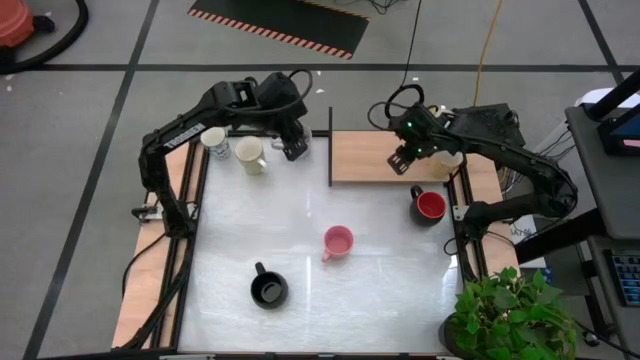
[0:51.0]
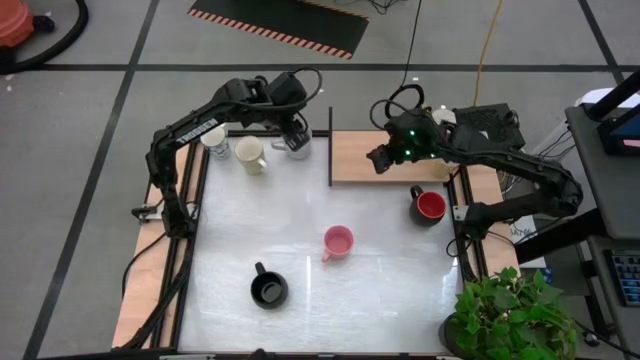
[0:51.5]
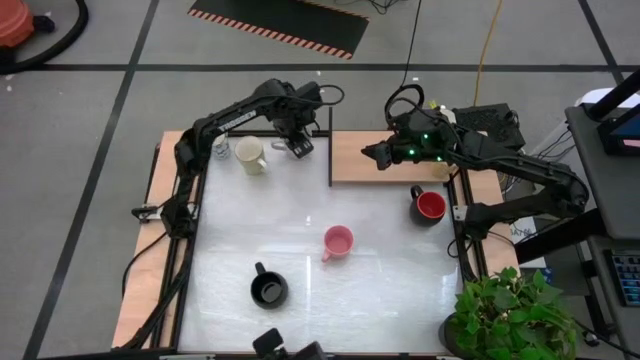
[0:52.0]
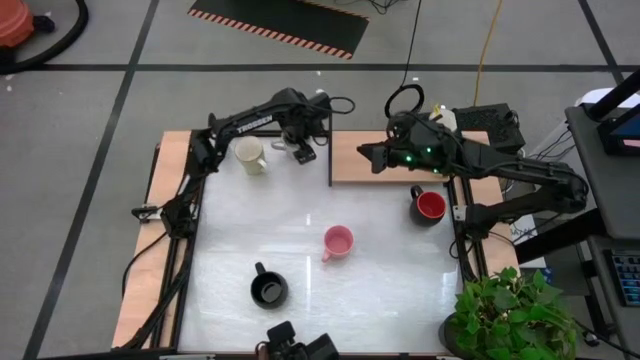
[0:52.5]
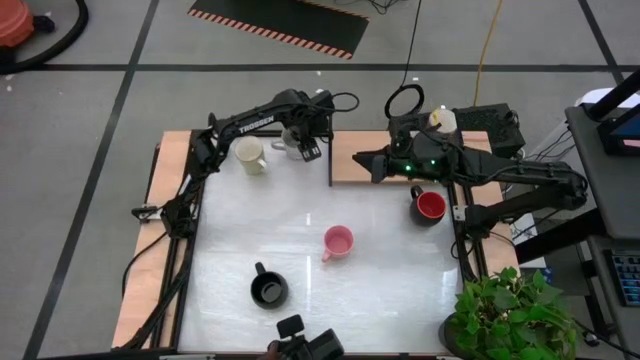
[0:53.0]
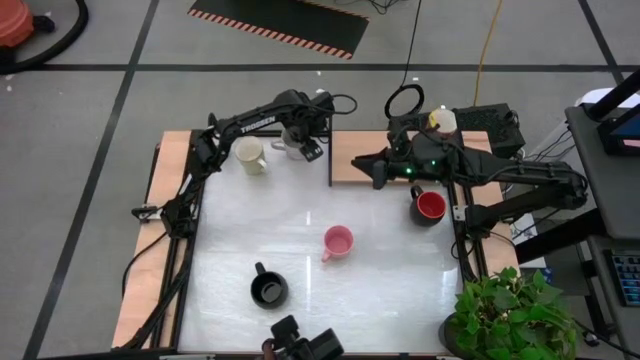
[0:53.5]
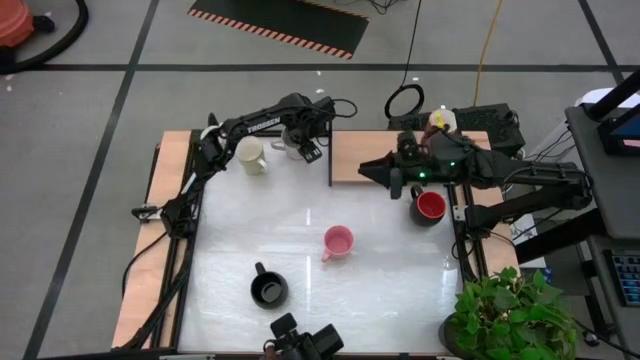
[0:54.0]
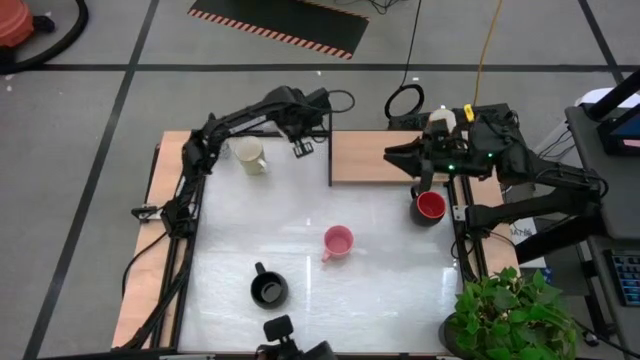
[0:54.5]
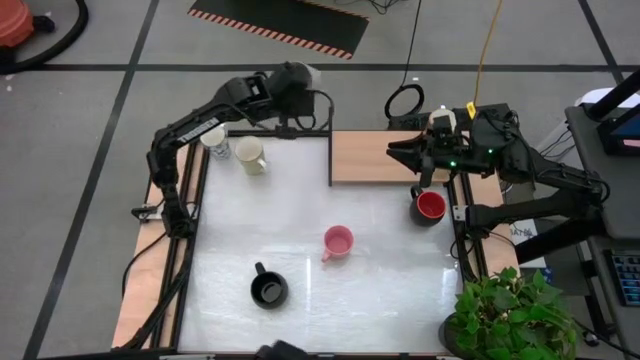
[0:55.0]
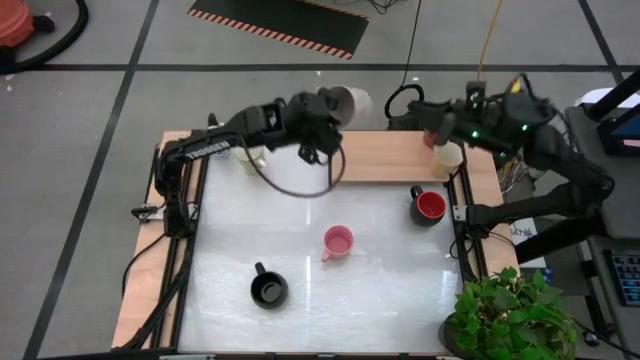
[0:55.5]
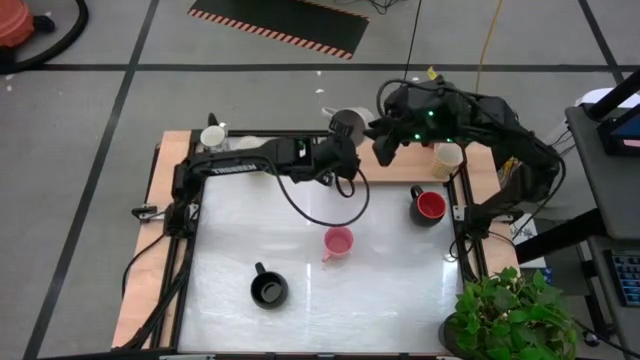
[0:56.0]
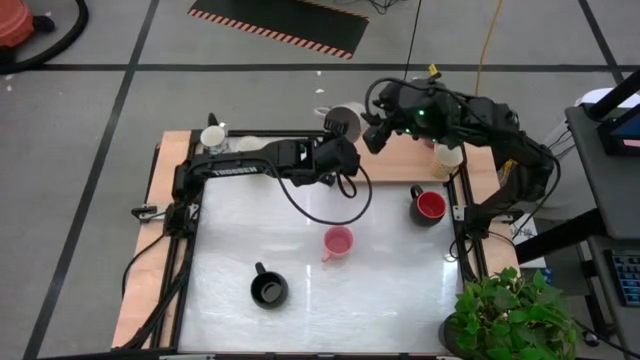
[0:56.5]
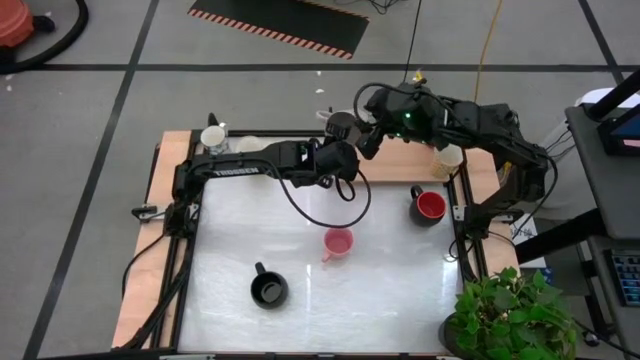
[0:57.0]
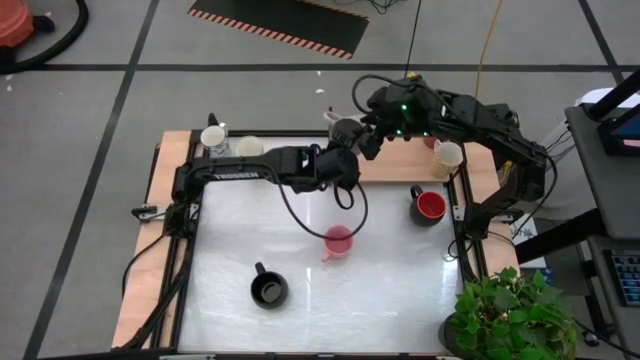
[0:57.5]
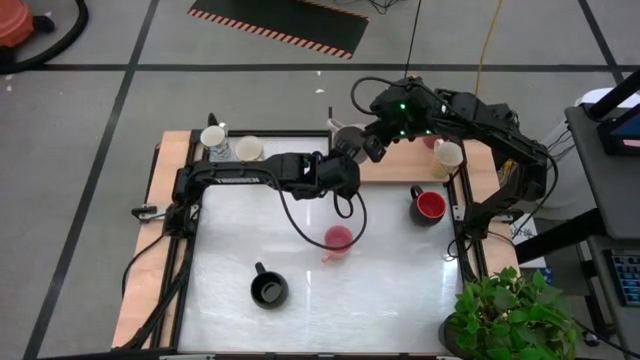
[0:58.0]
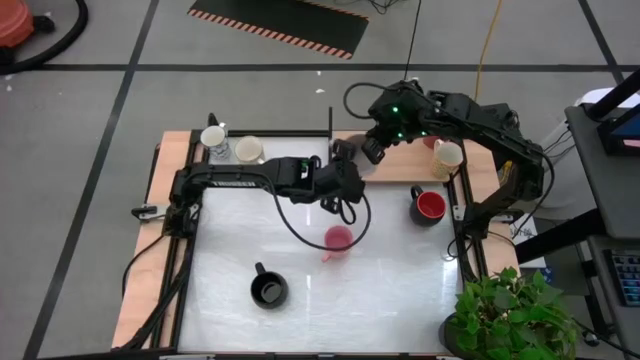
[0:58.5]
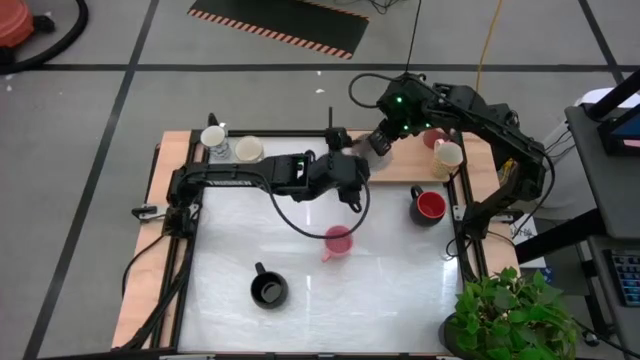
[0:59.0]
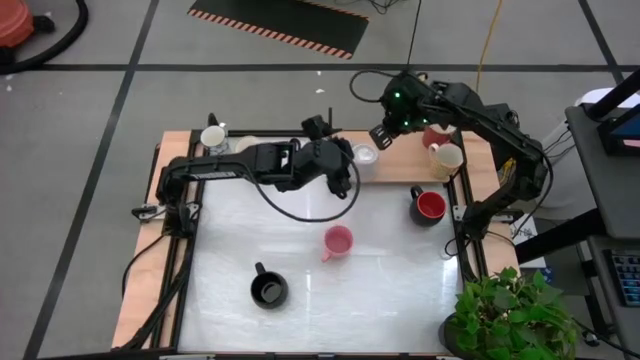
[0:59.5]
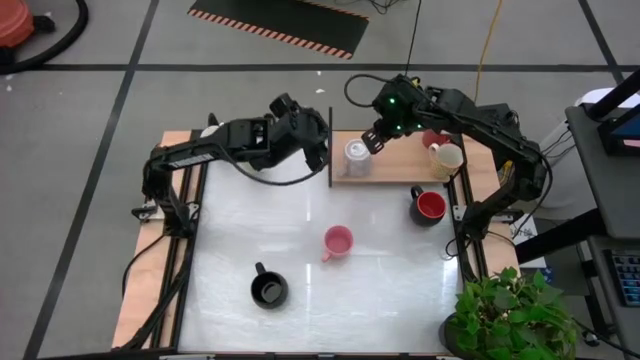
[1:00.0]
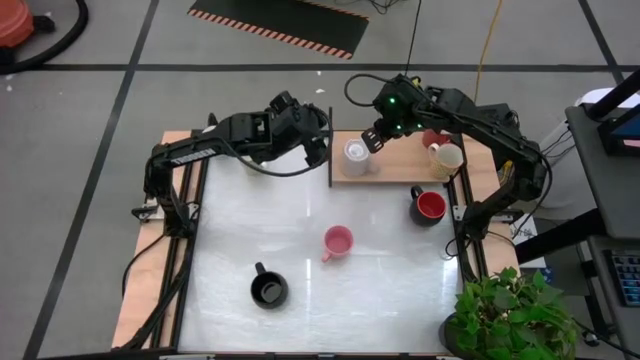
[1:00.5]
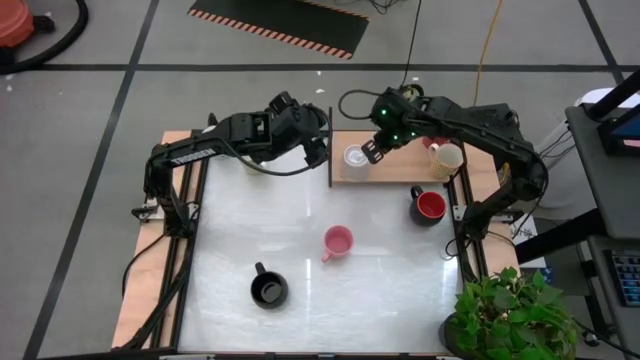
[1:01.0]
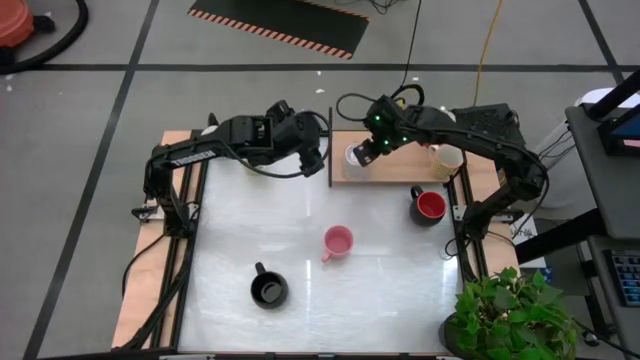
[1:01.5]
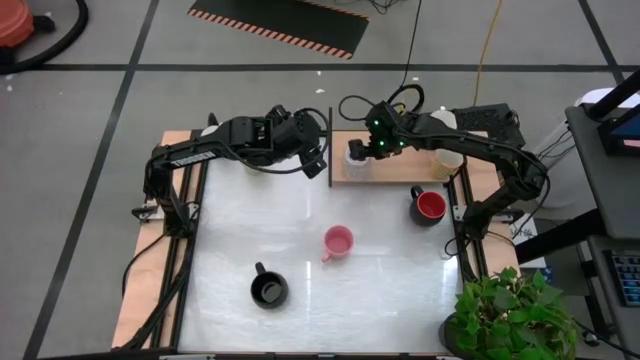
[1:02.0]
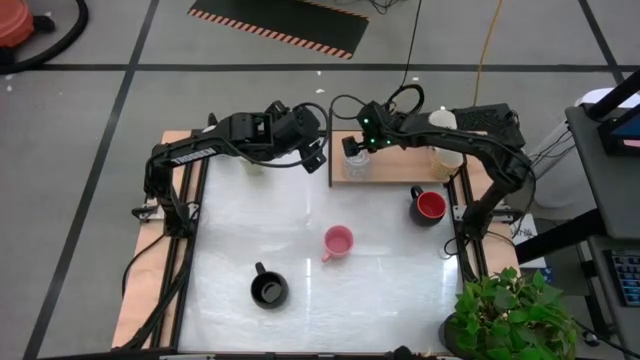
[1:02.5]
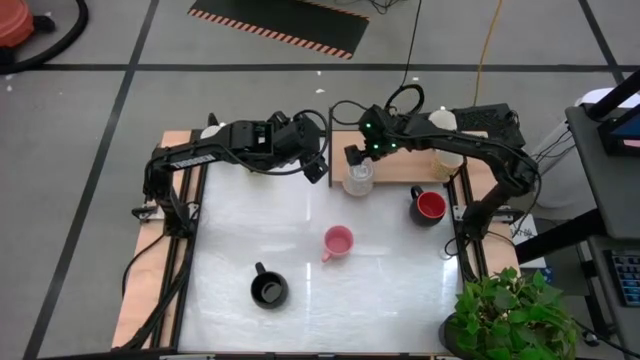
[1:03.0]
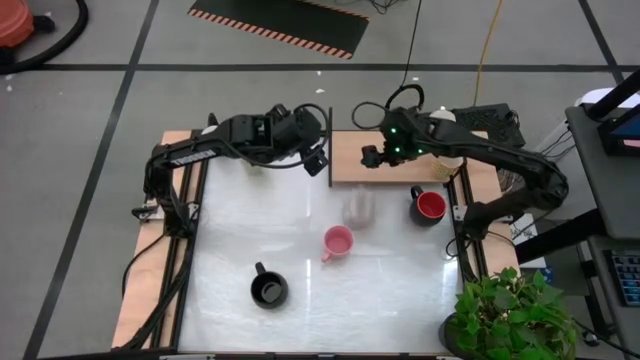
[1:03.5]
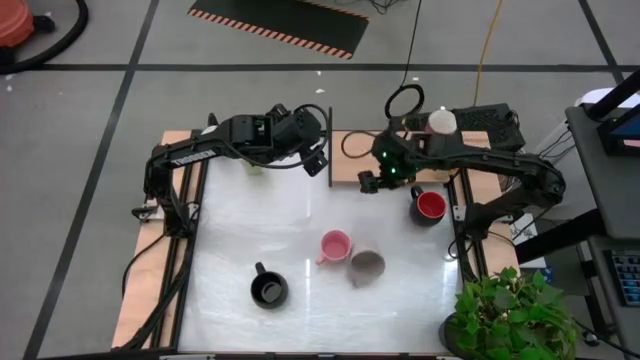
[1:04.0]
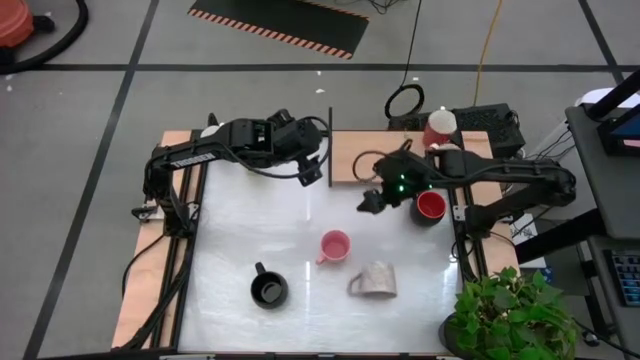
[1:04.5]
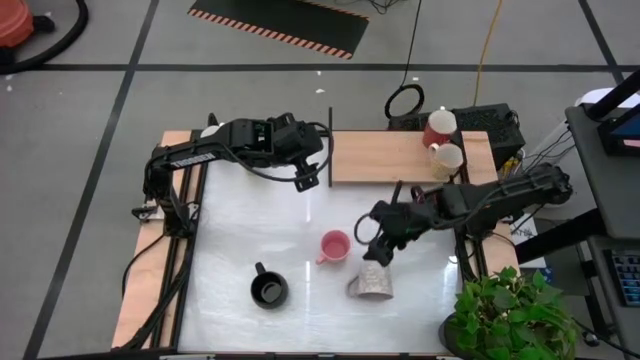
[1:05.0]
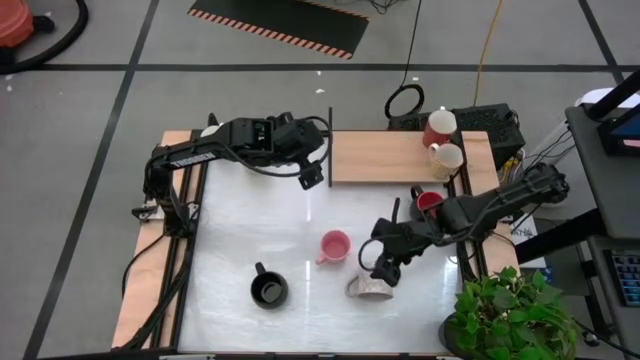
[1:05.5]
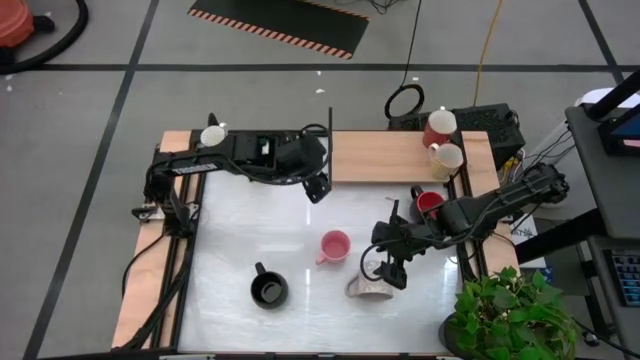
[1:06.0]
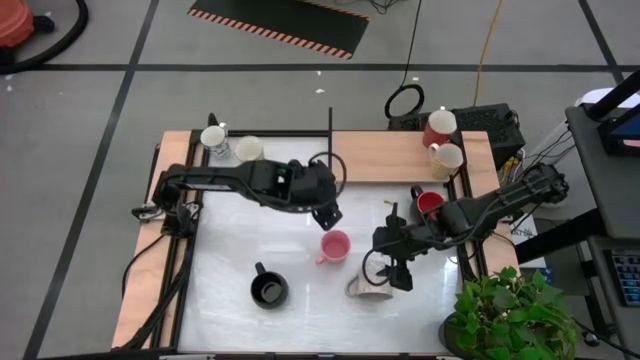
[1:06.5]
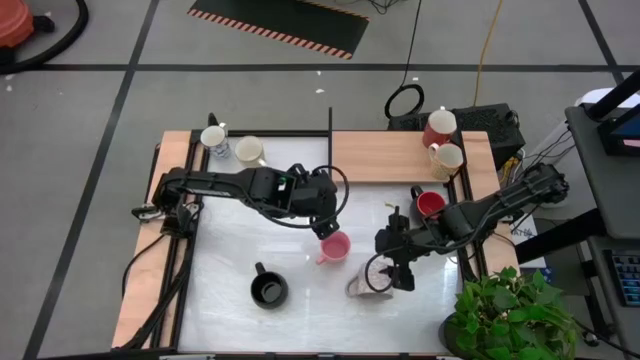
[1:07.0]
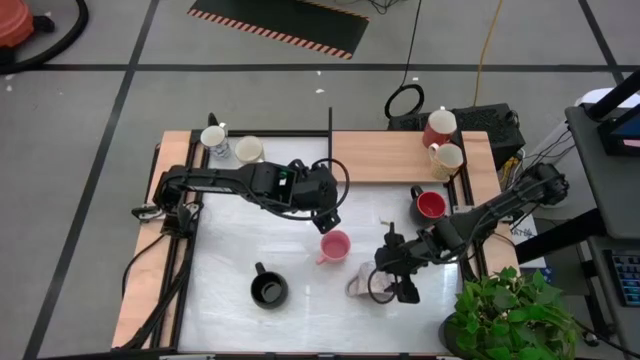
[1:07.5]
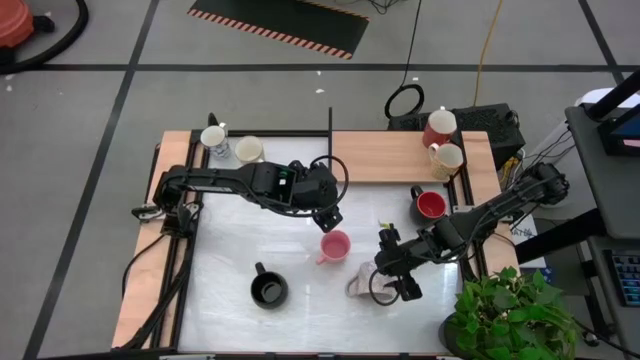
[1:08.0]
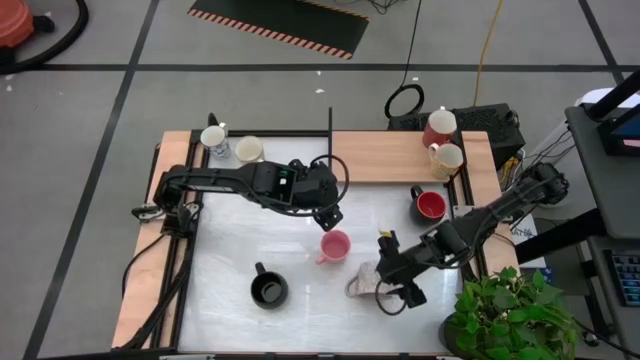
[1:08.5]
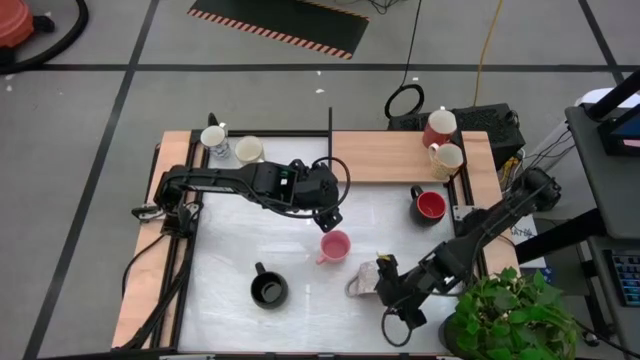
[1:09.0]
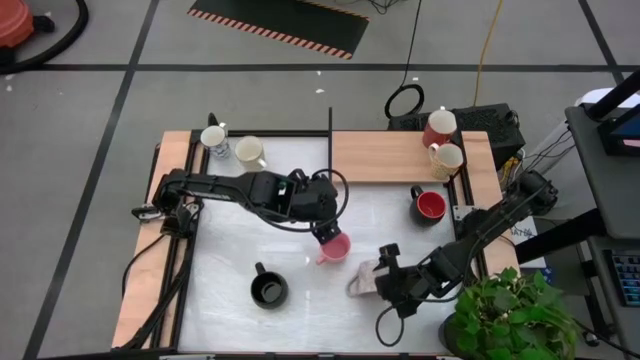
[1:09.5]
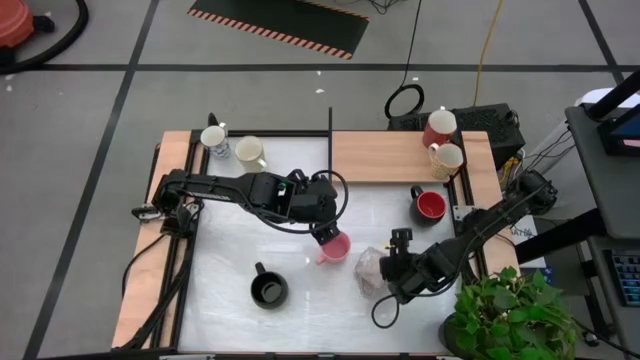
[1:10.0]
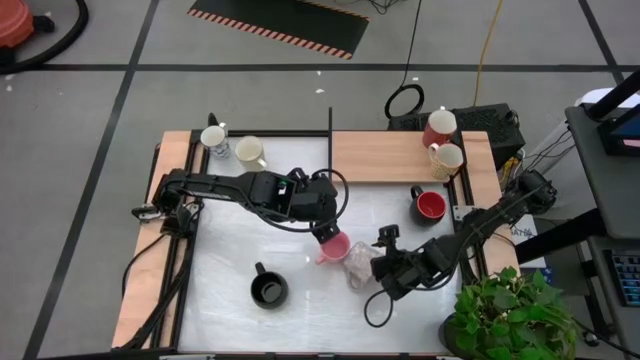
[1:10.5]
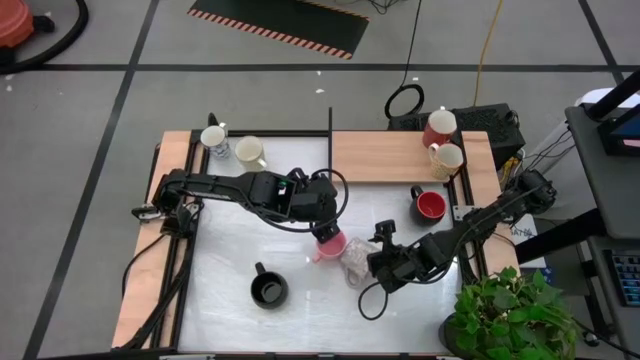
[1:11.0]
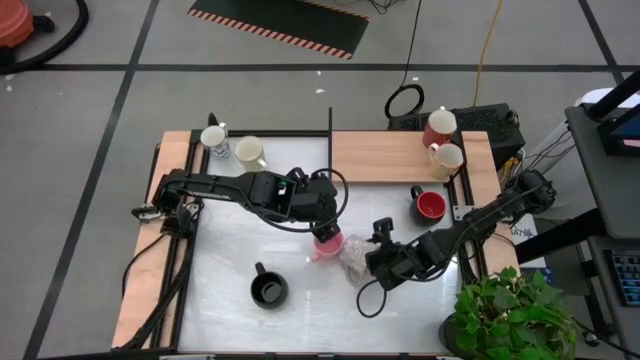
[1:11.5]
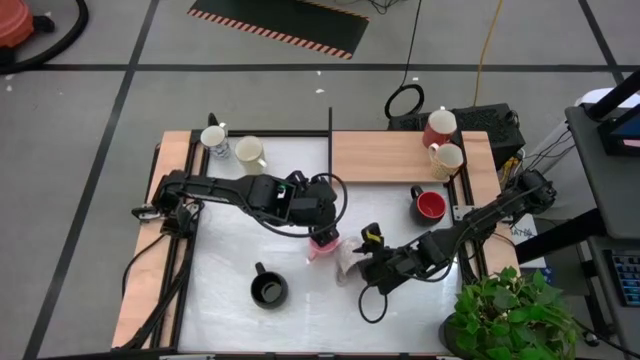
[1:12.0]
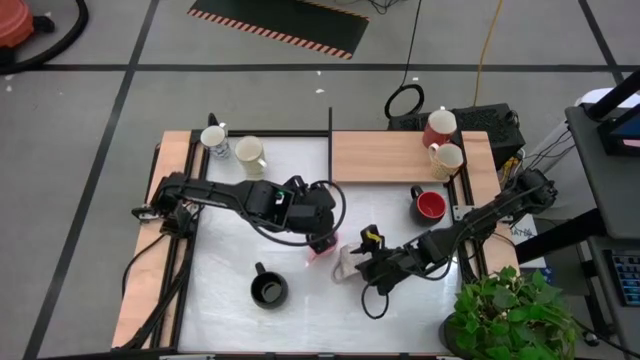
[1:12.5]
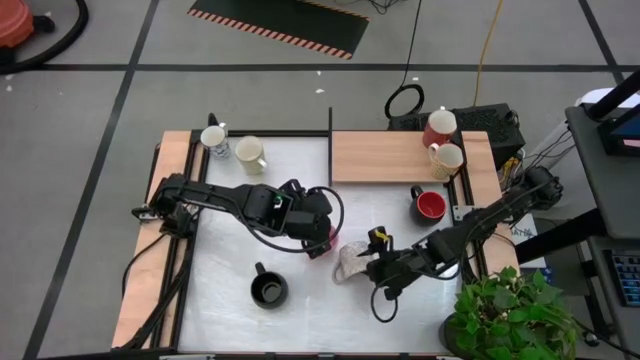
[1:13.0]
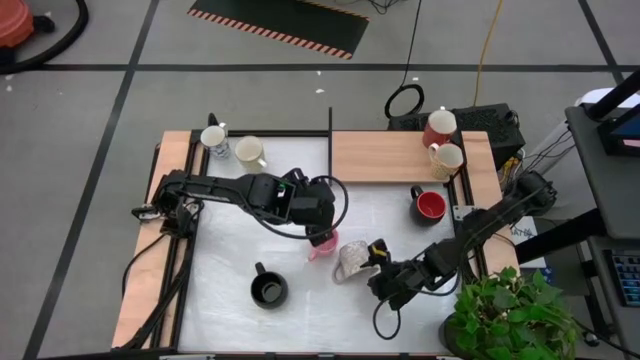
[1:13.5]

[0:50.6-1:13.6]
Task: Place coffee mugs
Put the gray mug on the shelf
